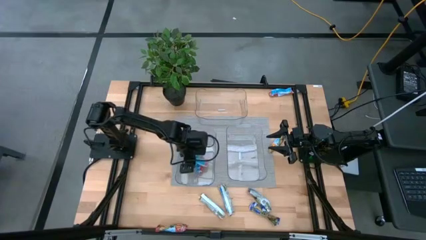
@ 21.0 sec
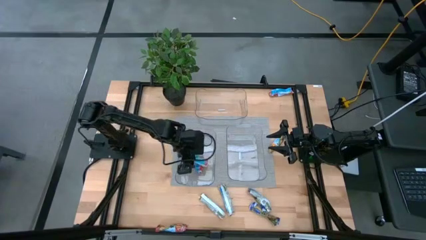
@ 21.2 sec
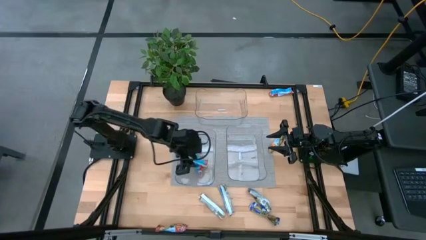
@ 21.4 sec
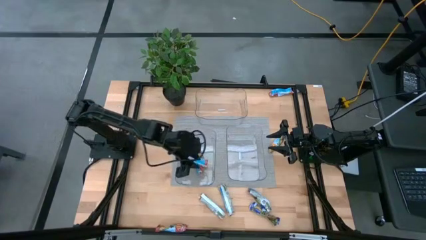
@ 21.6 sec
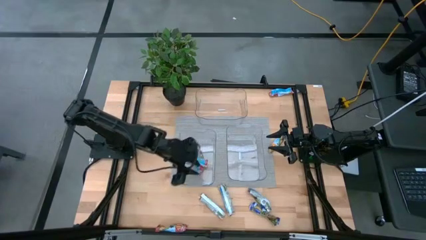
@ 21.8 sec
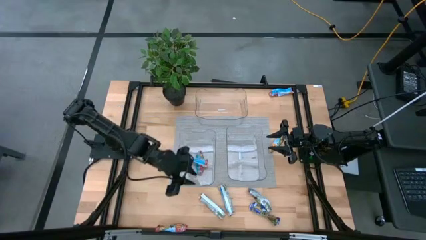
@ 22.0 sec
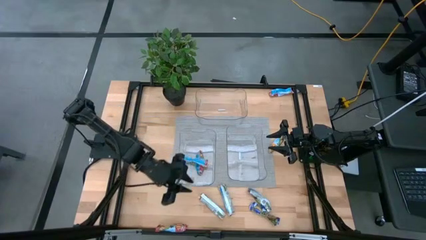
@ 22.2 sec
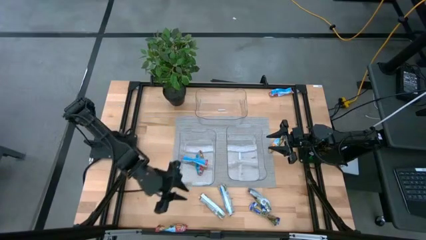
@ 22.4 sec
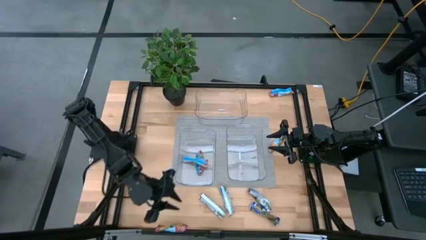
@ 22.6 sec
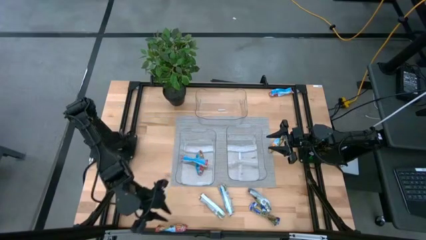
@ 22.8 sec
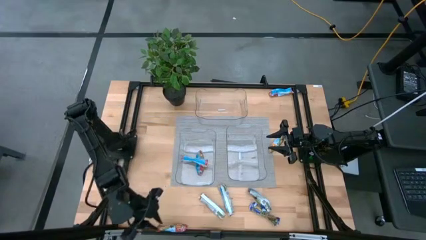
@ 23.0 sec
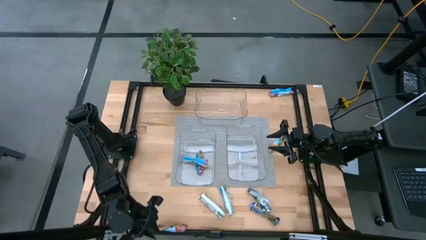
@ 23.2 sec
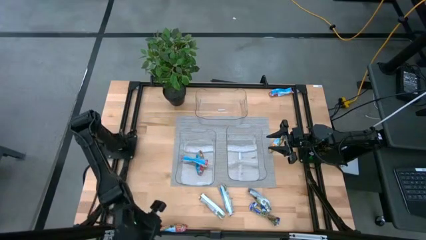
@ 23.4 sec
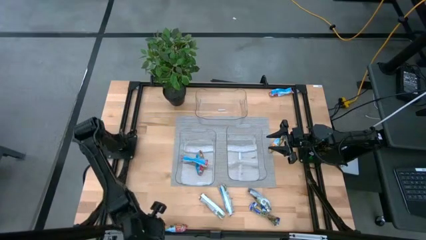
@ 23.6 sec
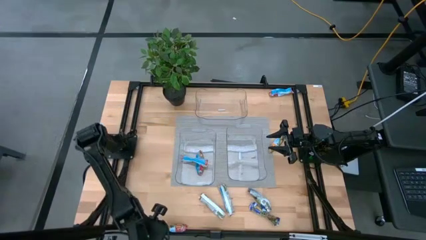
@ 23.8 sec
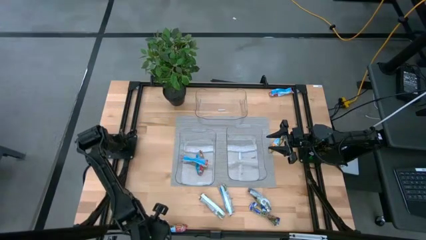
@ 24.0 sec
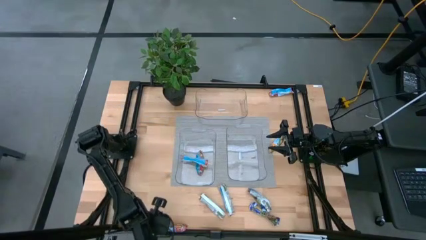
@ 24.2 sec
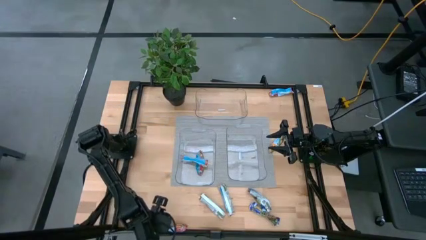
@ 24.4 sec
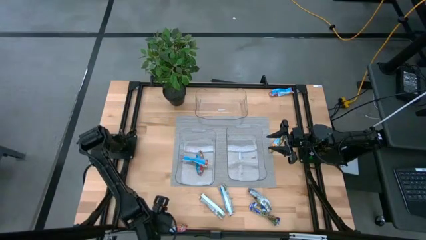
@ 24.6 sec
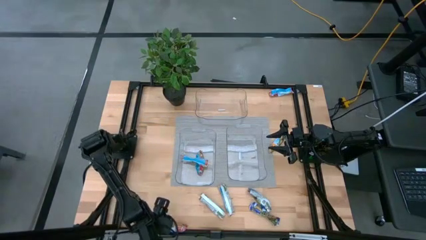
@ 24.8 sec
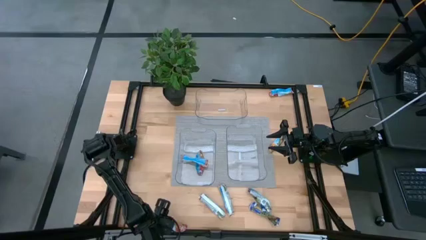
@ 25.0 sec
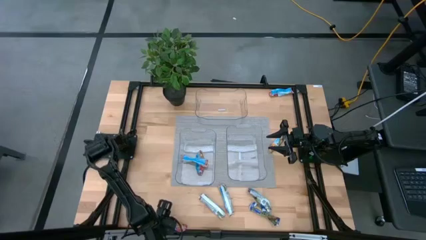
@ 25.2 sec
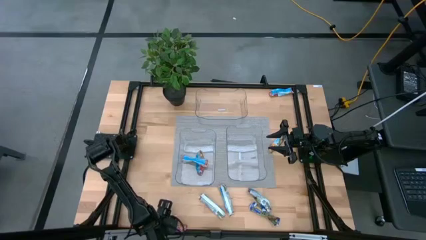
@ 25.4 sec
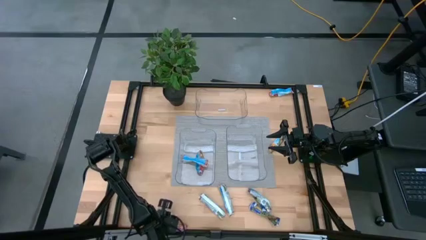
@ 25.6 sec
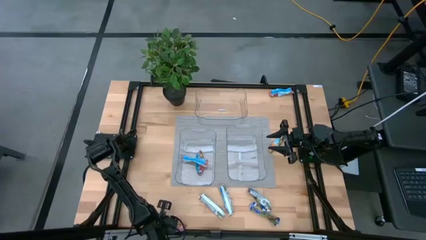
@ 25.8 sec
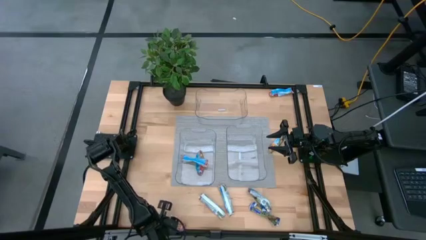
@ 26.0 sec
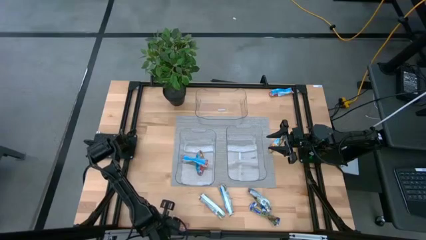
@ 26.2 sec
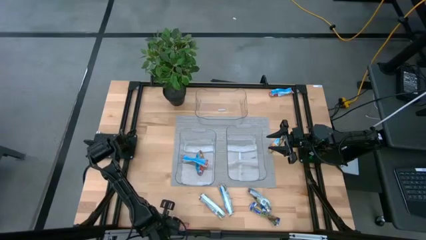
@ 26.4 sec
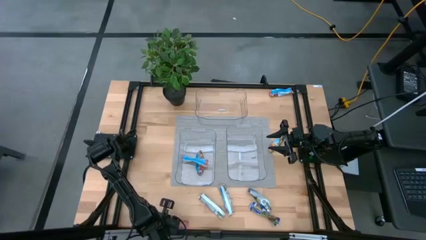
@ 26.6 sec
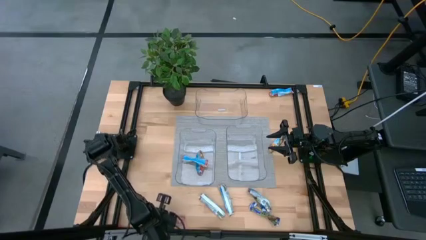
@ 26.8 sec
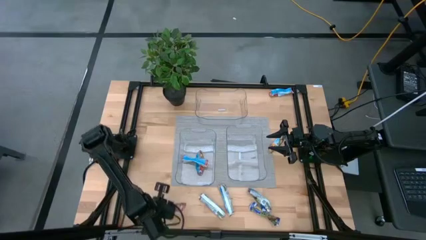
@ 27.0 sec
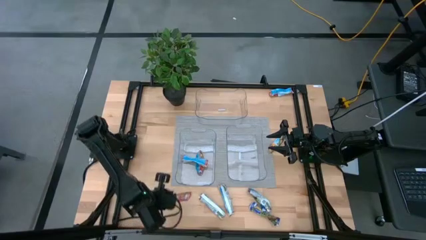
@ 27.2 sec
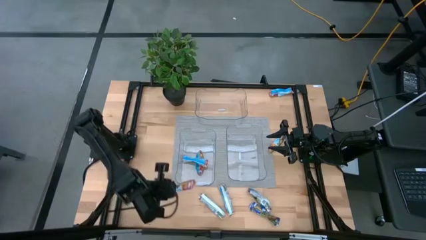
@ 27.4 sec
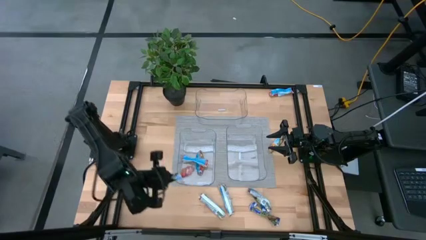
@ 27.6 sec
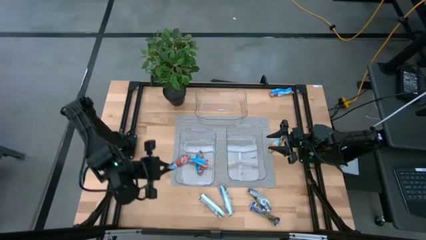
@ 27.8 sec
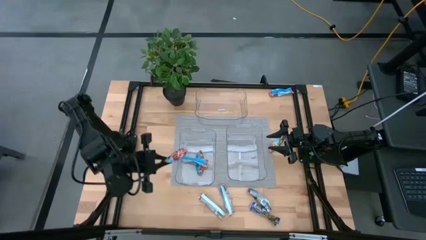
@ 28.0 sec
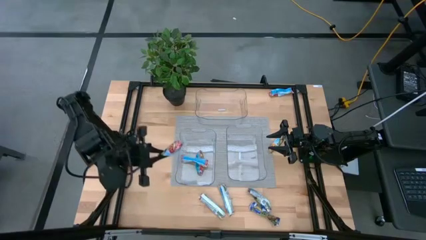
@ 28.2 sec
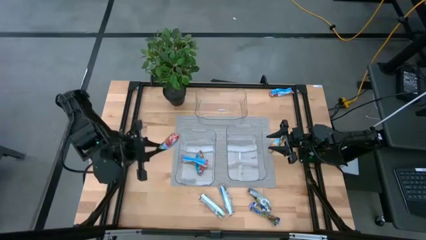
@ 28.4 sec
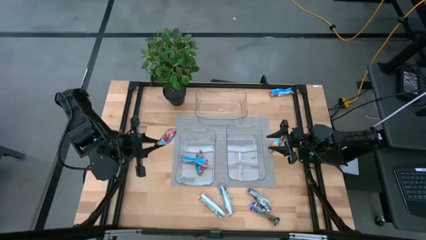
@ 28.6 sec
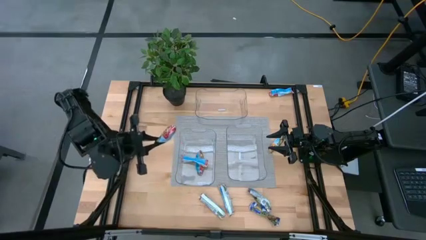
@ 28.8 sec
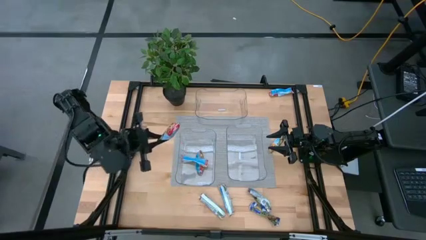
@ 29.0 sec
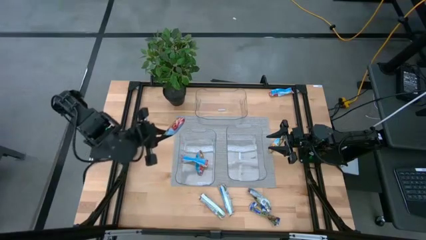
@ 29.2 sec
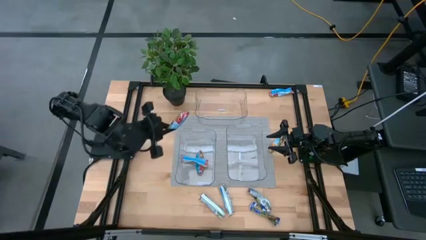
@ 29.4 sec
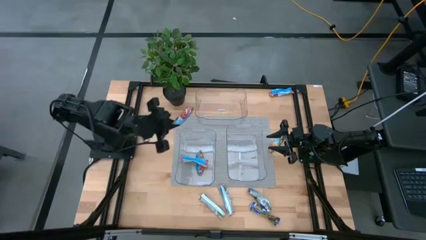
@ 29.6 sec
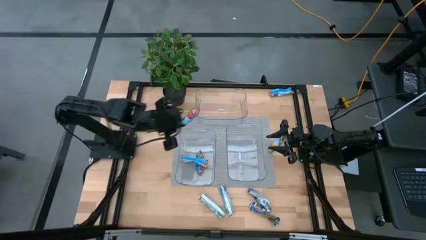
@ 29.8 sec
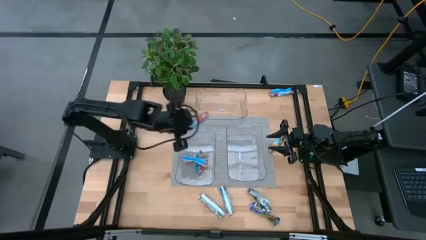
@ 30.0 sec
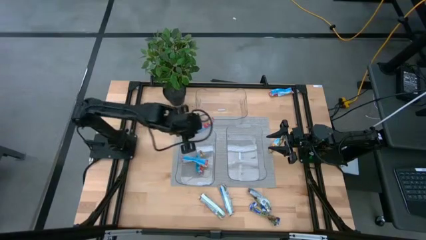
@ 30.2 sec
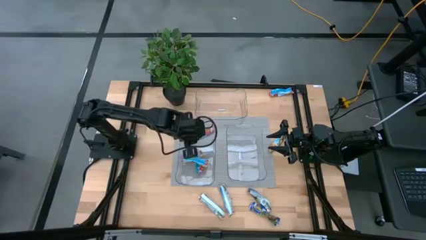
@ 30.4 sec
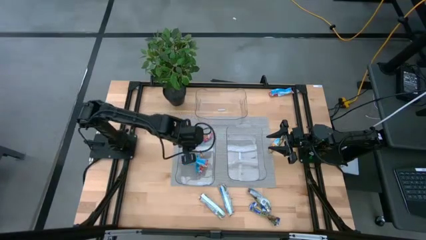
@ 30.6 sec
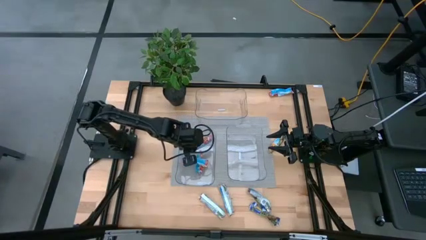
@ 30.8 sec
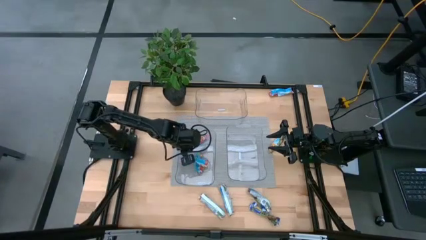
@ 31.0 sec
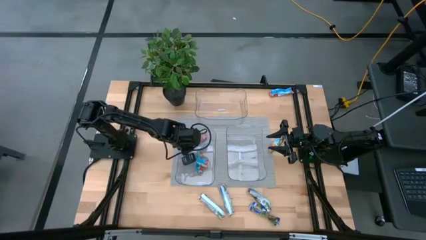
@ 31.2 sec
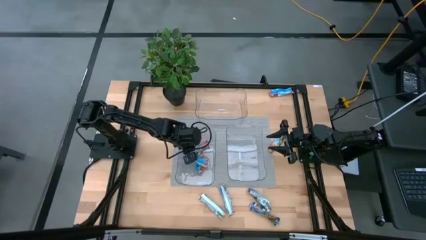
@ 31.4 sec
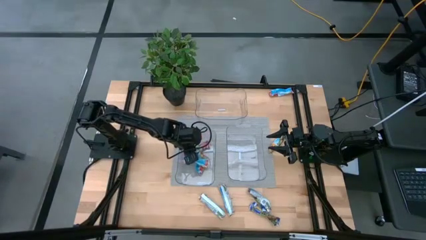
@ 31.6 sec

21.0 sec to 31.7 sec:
Task: Pick and place Granola Bars by type
Put the red granola bar into the bottom left transparent bin

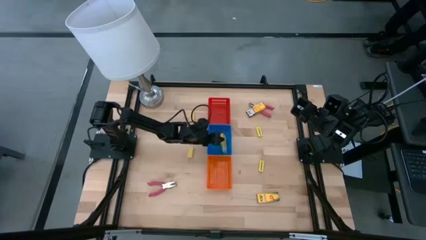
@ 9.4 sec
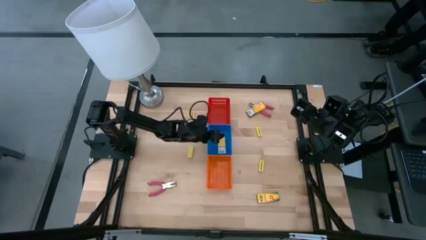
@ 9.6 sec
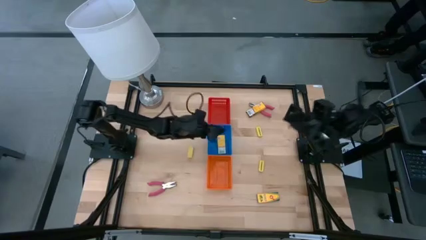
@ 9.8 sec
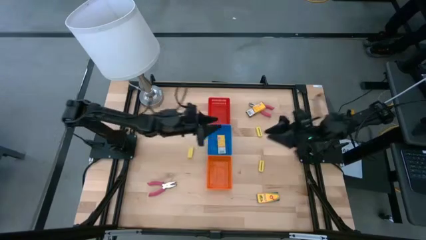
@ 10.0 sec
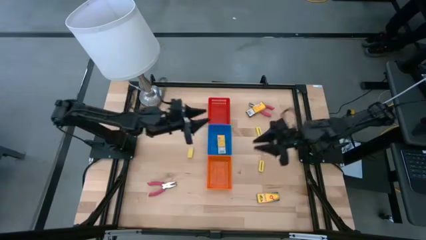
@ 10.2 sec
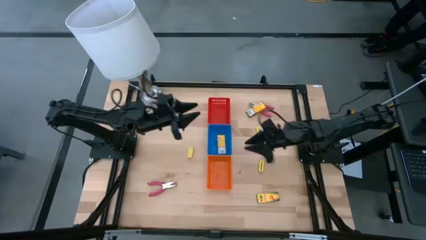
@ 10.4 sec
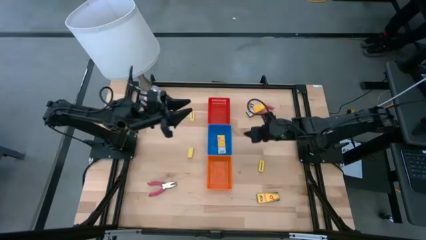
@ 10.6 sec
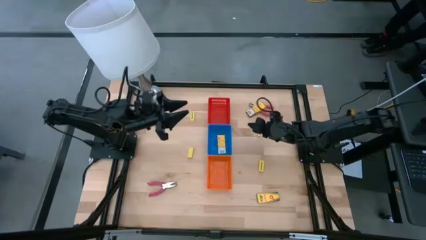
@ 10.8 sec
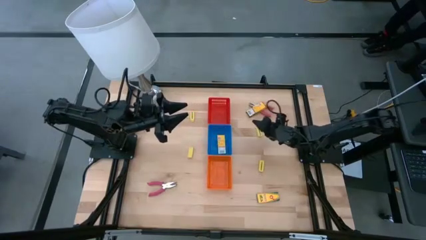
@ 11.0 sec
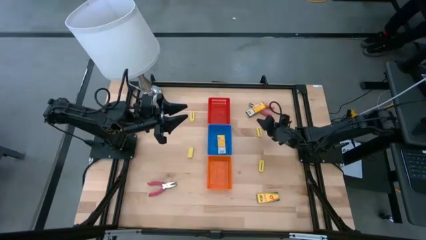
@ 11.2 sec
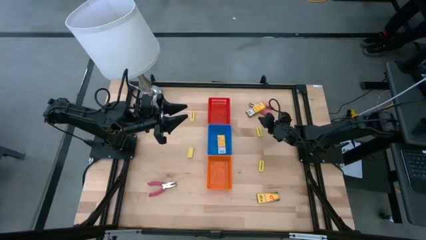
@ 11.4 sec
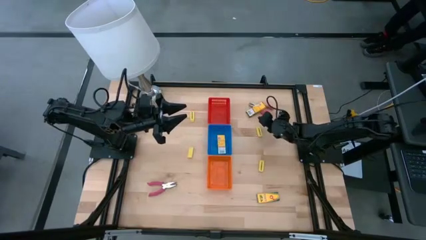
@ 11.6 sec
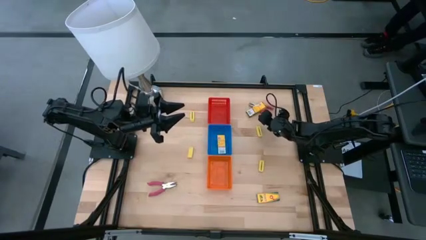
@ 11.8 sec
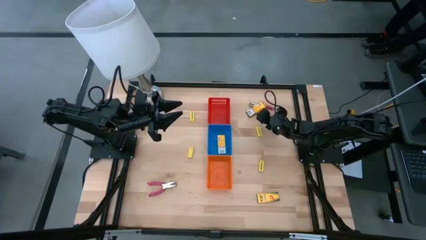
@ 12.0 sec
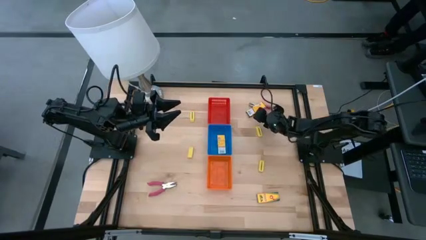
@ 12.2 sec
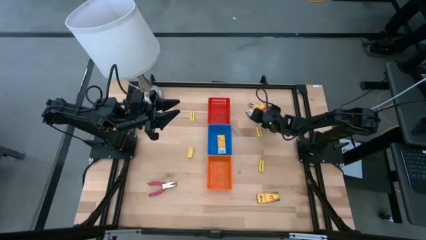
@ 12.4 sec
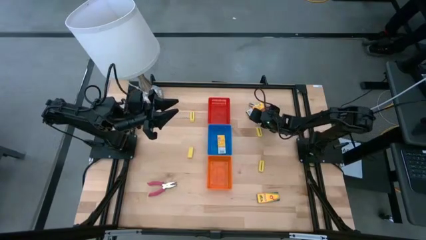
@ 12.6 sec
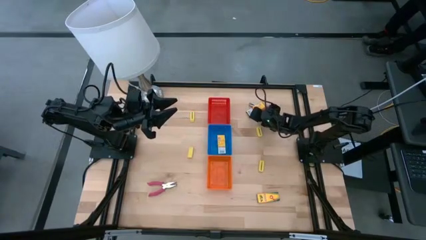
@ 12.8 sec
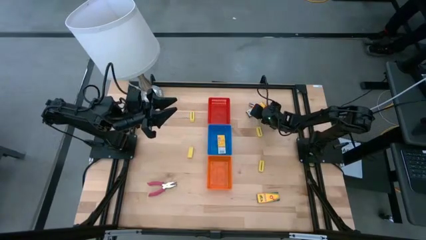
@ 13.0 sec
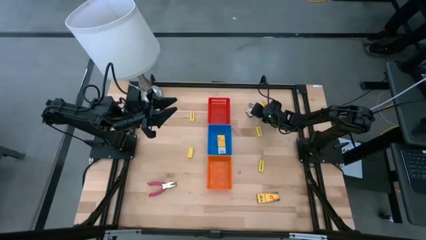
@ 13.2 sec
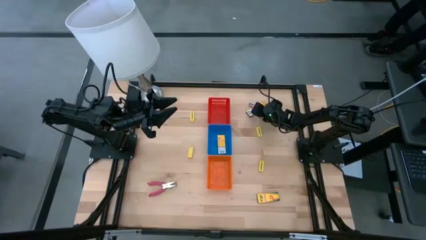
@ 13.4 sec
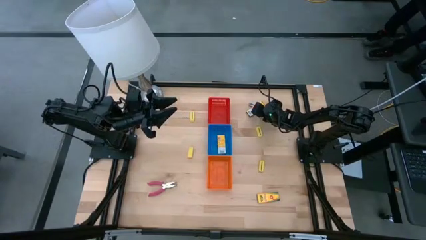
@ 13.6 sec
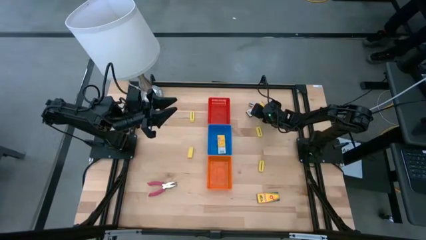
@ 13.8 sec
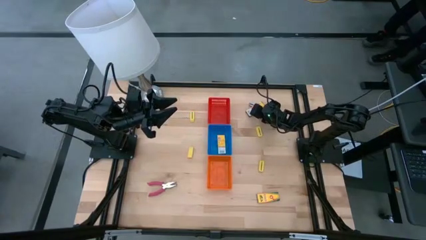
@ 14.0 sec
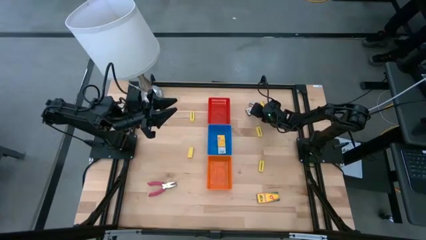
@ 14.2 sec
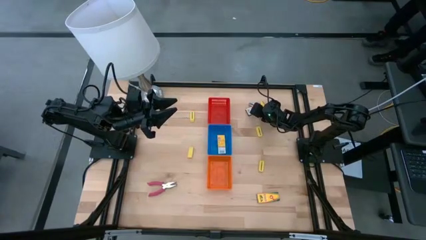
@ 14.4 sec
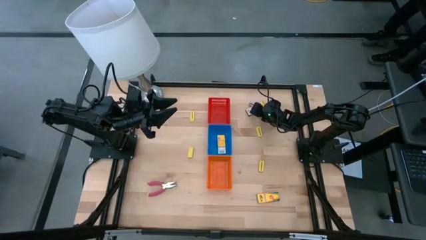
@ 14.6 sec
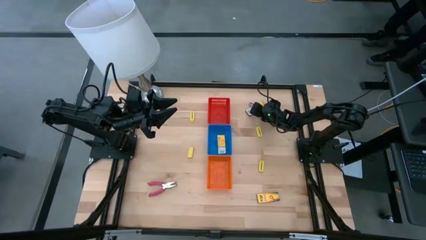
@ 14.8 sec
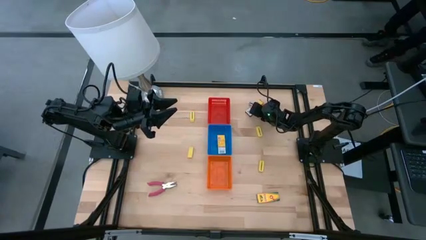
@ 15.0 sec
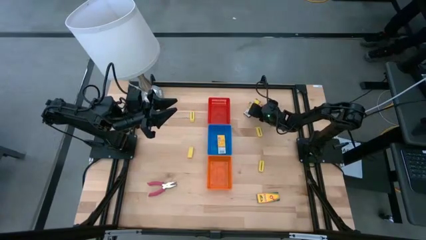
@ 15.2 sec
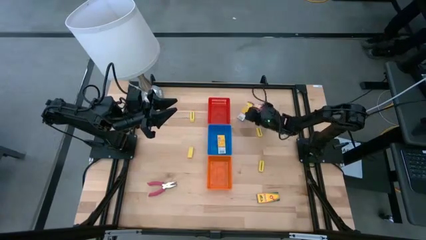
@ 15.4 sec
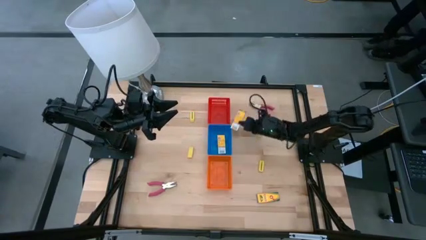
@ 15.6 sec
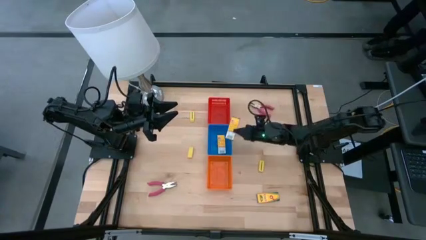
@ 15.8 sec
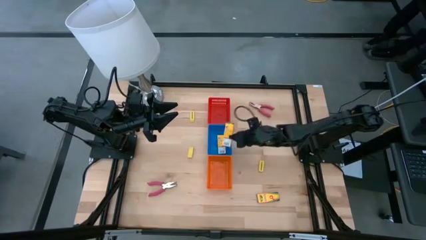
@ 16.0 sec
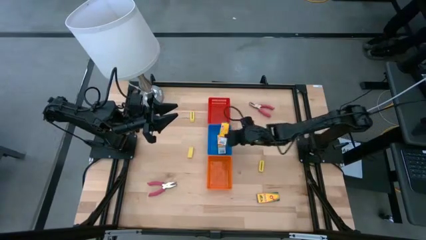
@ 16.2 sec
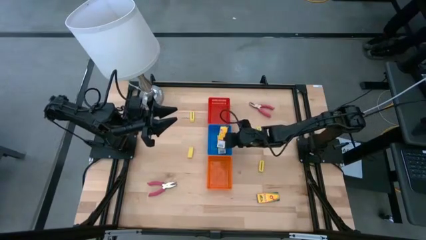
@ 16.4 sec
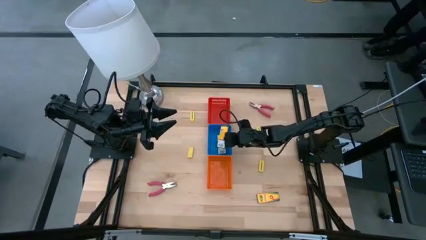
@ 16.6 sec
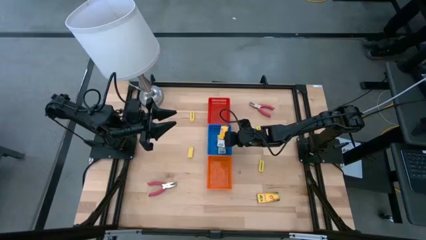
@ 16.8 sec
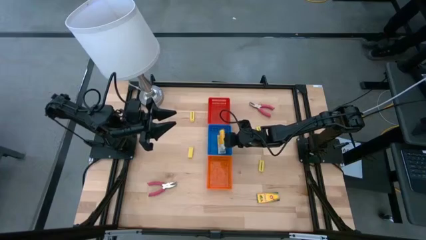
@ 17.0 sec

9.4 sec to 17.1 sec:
Task: Pick & Place School Supplies
Put the yellow crayon box into the blue bin
